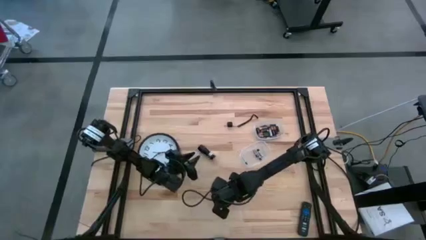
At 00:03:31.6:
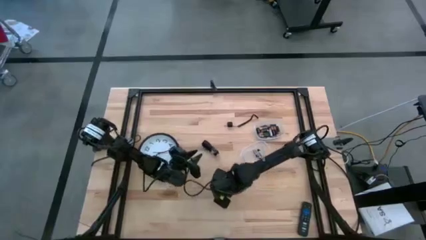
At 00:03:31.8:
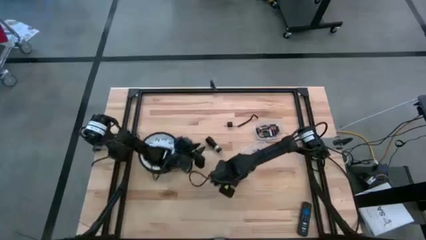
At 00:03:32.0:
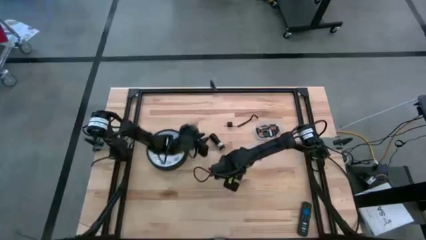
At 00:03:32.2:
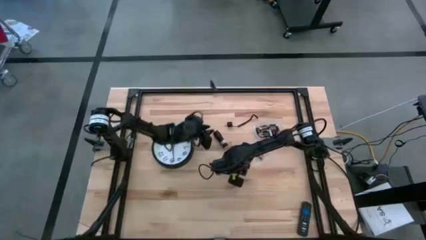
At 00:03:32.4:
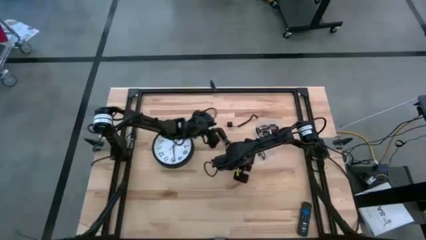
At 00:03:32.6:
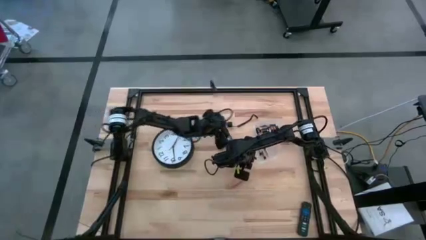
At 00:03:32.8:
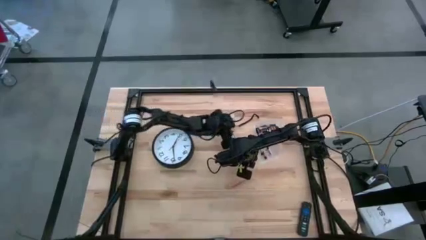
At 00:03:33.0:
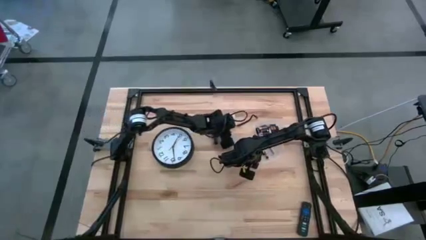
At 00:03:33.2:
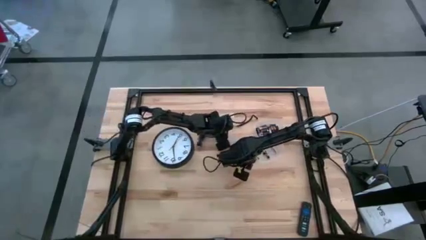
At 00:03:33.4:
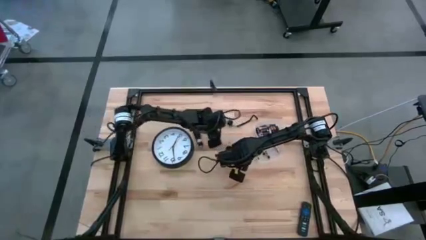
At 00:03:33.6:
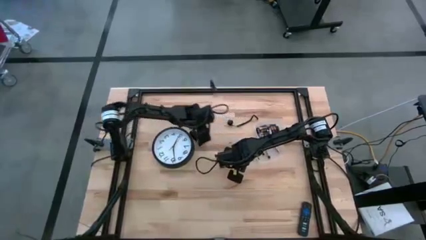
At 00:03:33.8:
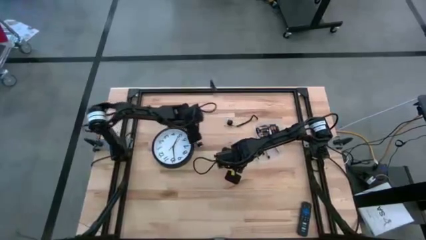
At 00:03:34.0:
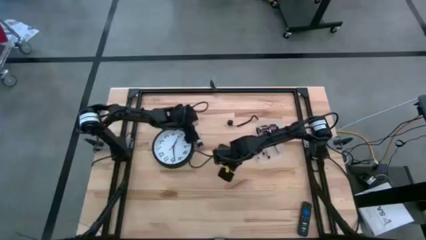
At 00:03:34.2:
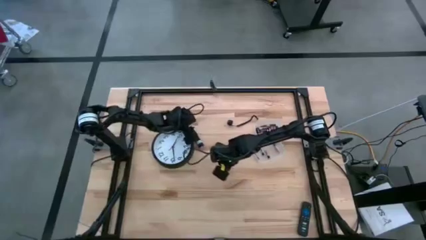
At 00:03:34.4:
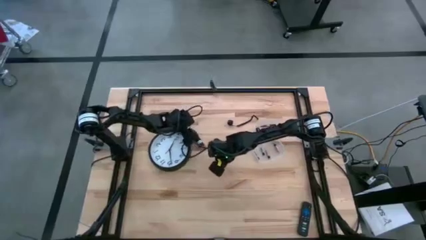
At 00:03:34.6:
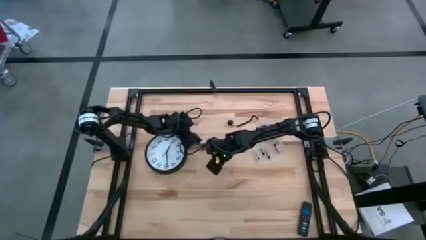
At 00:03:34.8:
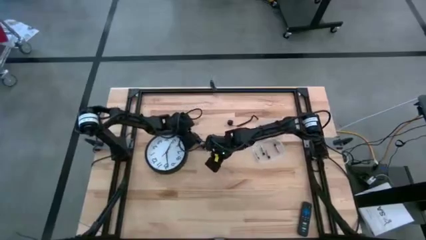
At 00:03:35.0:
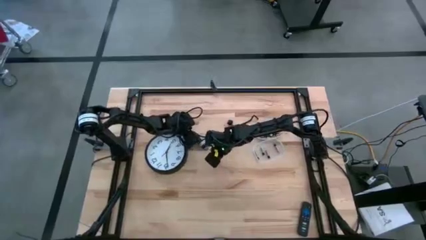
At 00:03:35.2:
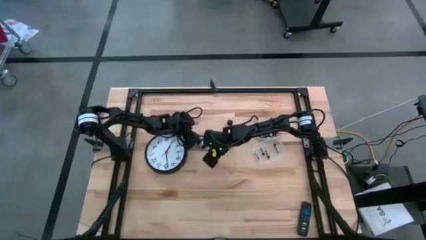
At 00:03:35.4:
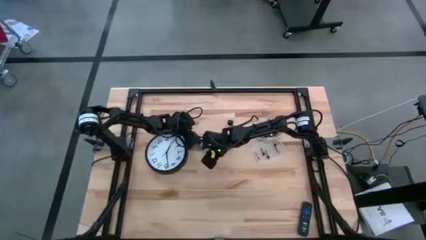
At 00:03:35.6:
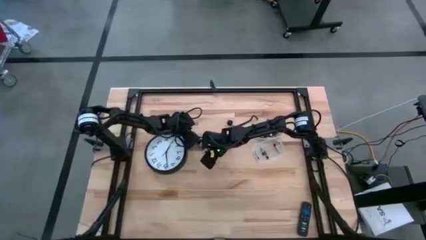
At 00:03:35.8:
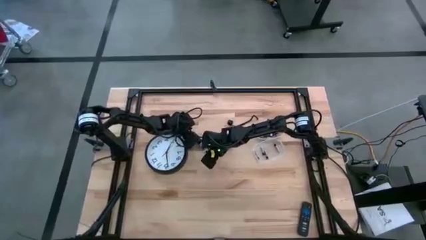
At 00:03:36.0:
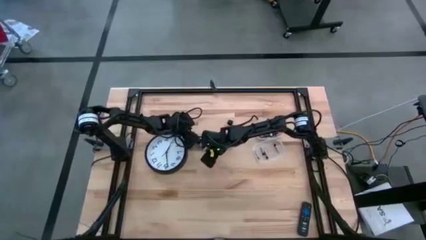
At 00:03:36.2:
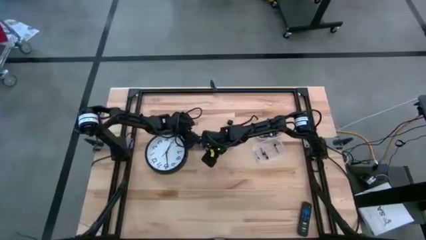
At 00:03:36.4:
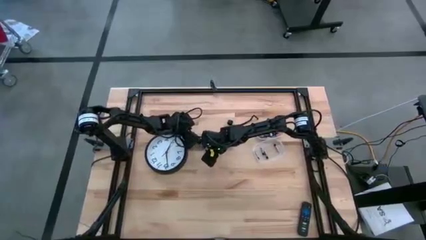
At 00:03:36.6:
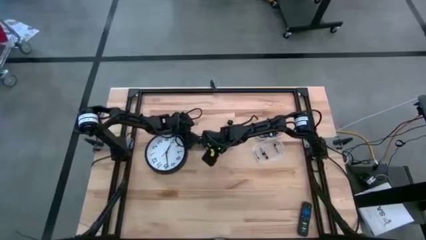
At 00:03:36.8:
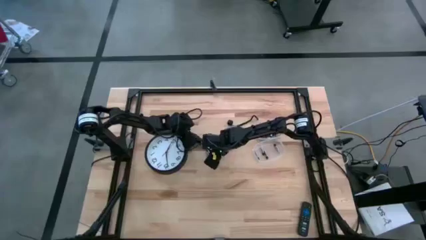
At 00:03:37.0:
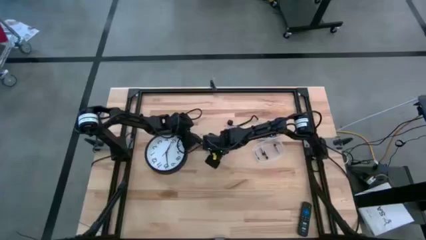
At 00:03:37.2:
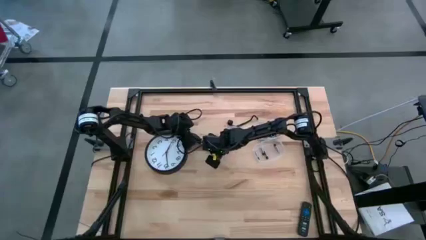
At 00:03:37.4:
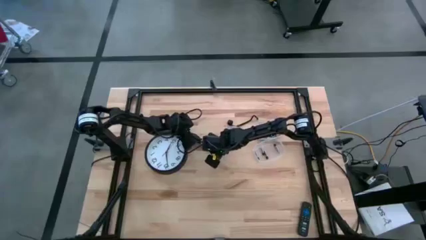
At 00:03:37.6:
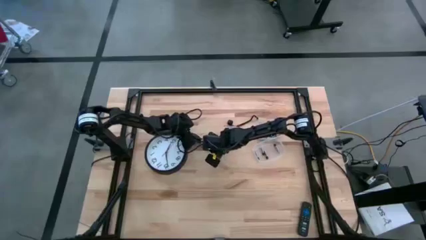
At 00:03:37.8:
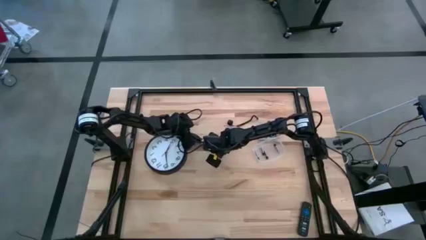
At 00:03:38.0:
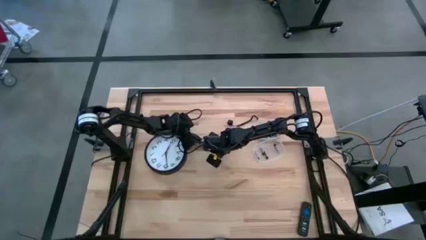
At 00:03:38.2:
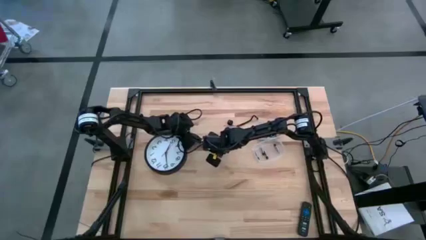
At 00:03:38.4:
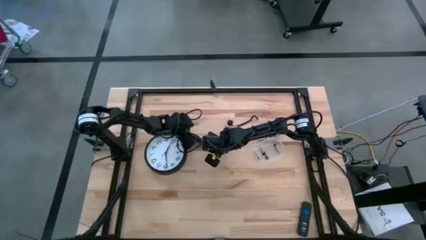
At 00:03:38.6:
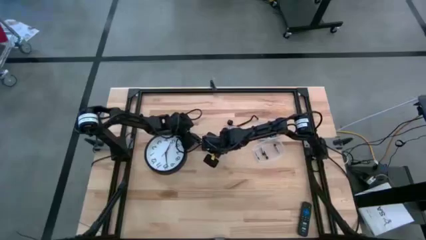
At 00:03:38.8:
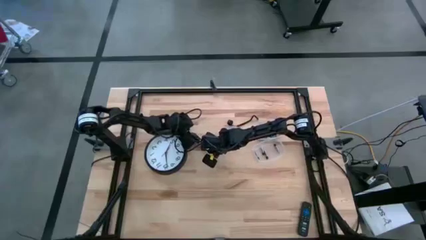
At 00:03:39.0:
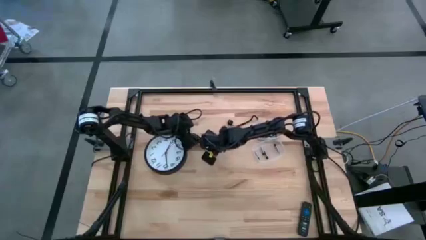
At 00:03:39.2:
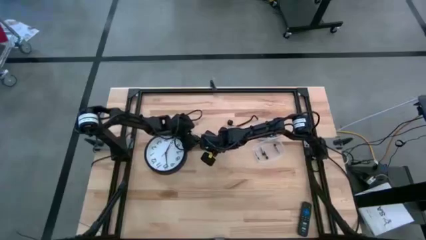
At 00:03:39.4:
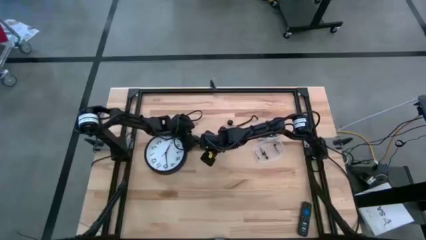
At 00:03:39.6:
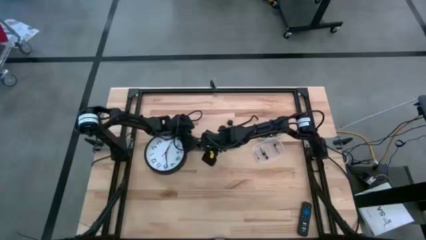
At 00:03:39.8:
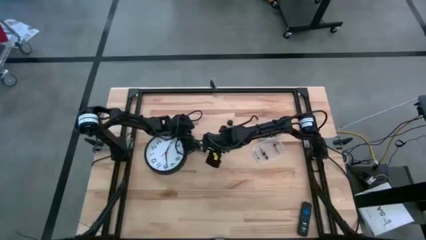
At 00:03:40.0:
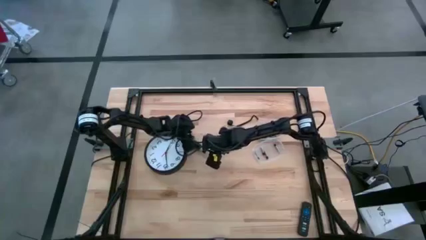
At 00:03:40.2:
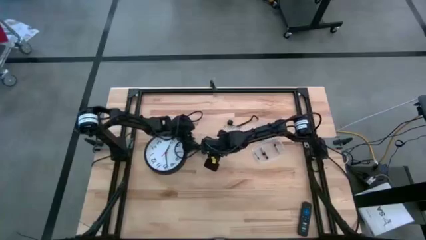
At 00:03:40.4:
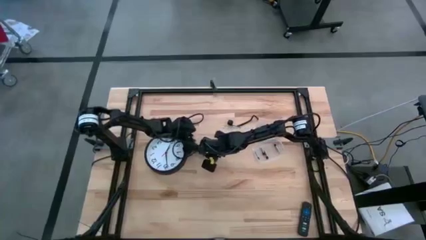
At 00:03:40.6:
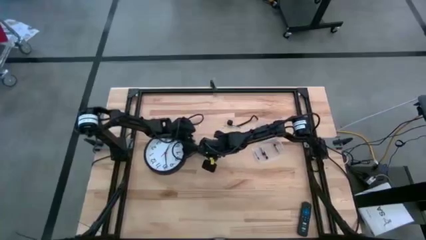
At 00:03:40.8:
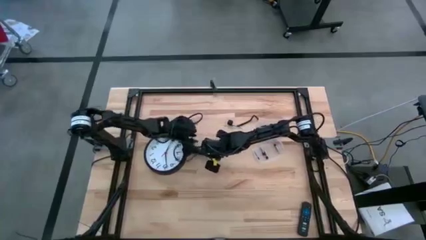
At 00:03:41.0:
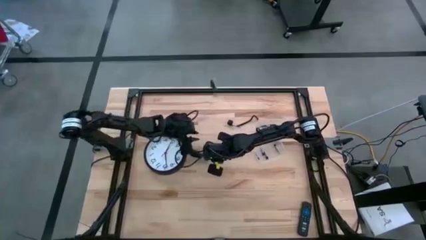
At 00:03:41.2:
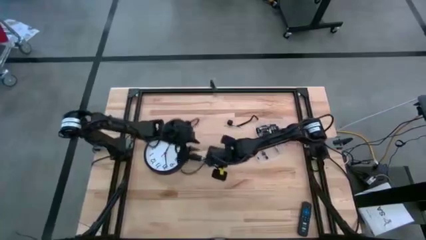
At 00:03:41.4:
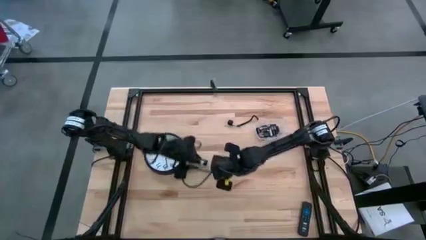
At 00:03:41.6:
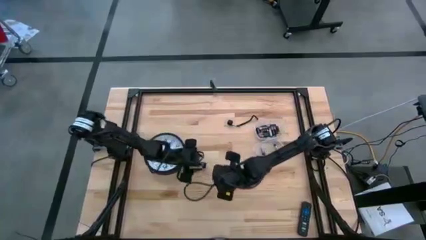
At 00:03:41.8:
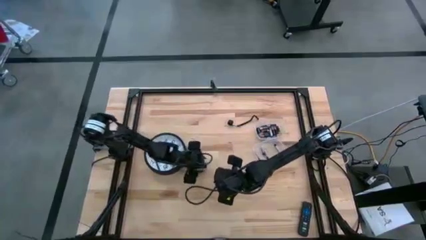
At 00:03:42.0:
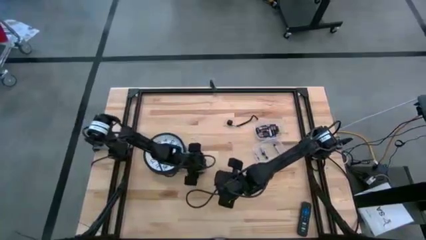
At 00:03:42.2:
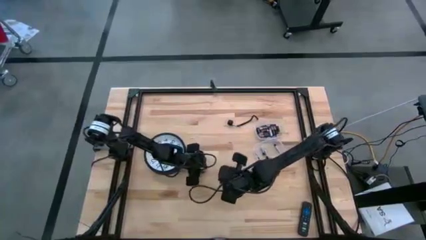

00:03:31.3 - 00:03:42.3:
Task: Insert battery
Insert the battery holder into the white flashlight battery compartment

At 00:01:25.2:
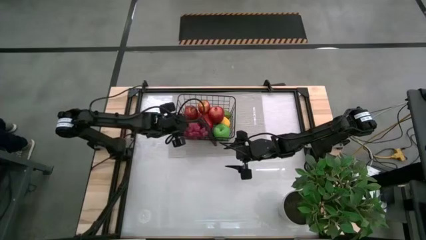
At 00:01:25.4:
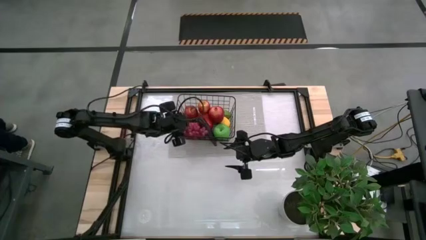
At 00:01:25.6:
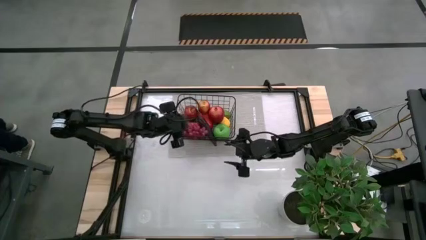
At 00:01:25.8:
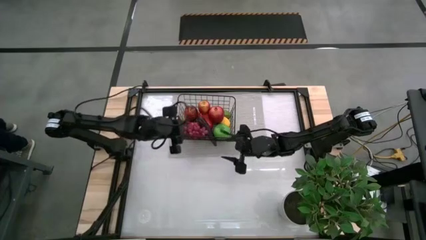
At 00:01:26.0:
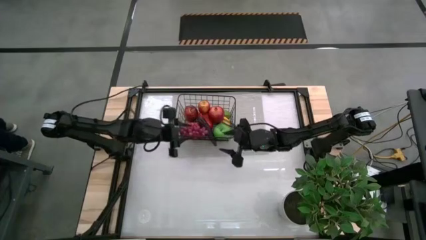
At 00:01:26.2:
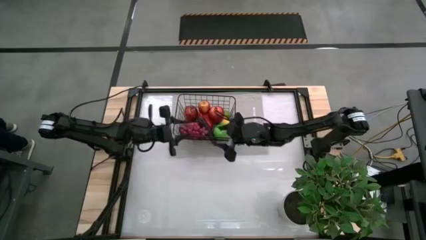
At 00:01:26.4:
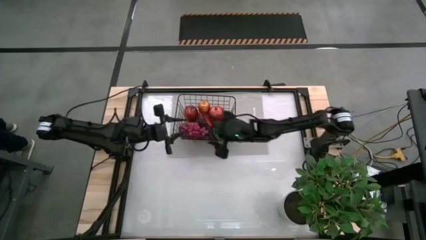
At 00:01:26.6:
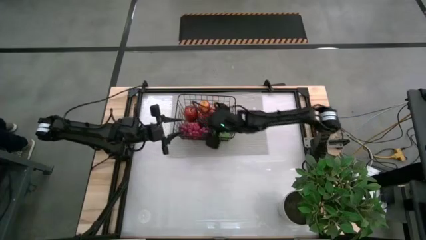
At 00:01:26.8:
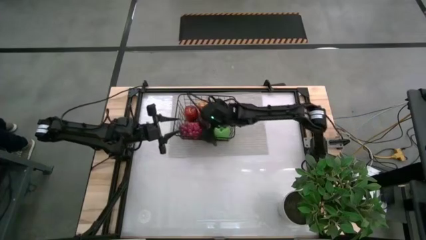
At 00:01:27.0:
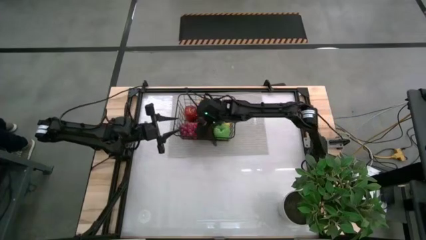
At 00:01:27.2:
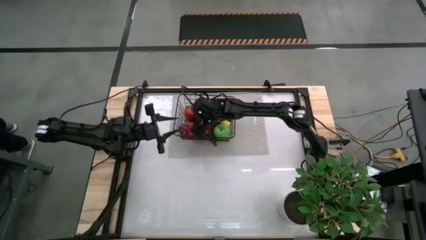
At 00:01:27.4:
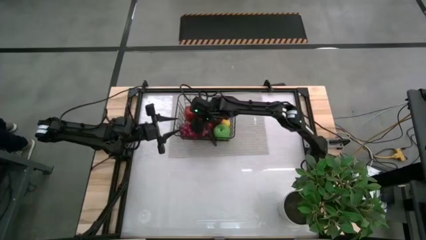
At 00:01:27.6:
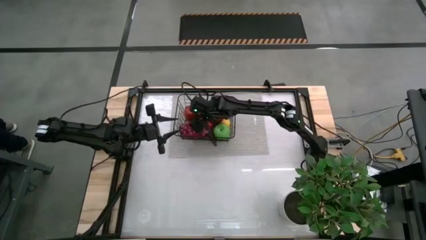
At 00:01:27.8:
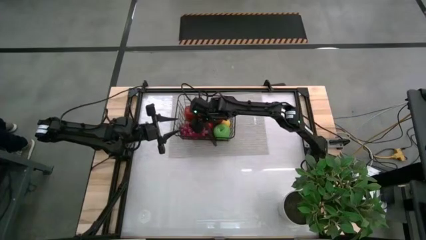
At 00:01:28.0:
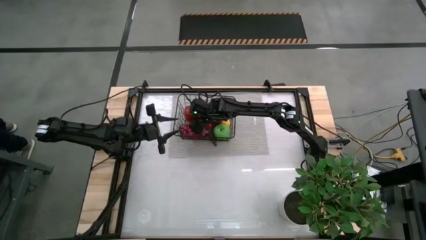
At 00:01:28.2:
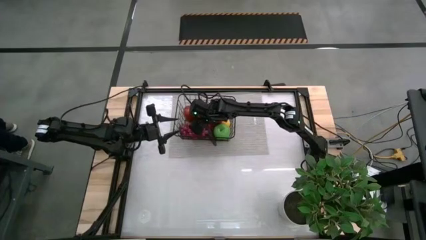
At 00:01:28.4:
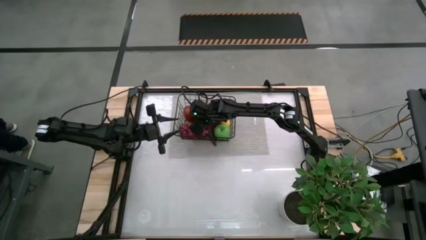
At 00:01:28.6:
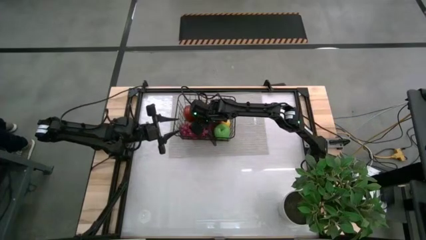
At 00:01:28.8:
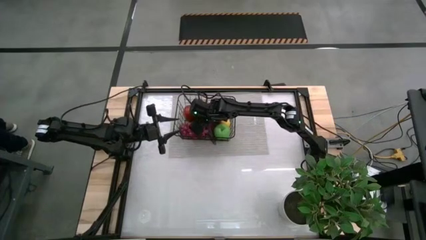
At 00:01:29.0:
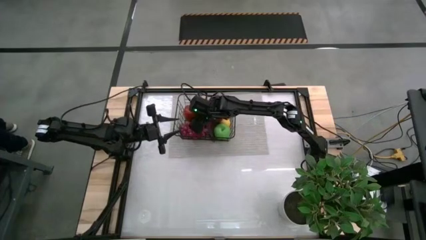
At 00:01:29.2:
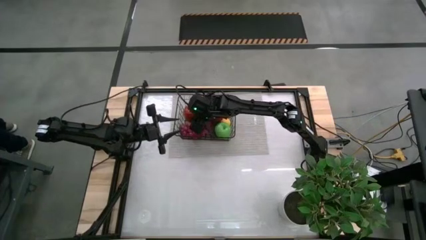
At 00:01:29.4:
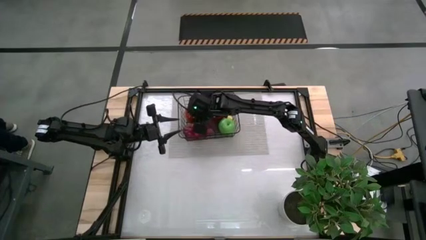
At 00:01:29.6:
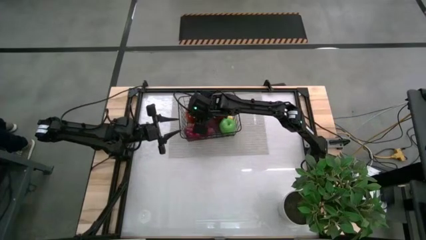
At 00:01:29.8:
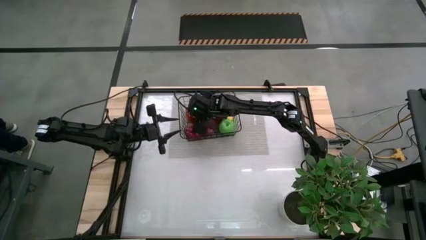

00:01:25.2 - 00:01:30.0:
Task: Build produce basket
Adjust the eggplant to the wire basket

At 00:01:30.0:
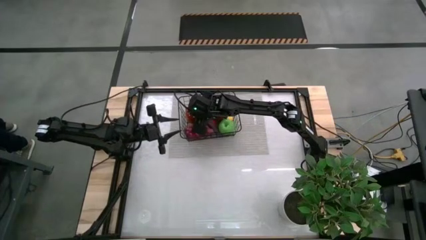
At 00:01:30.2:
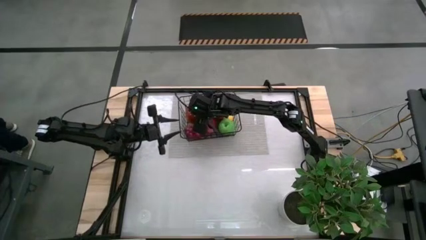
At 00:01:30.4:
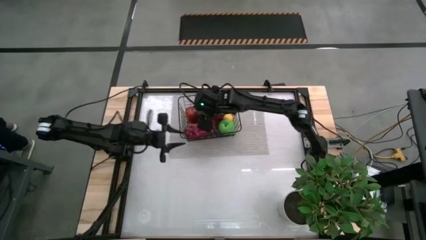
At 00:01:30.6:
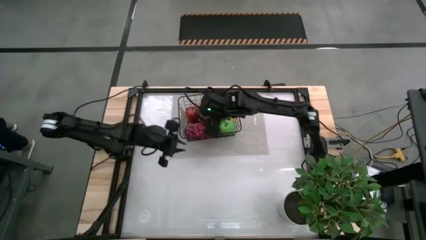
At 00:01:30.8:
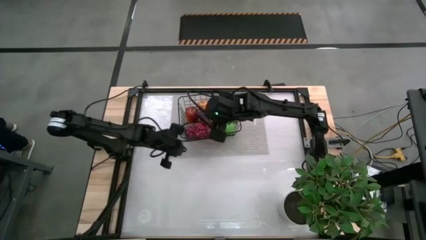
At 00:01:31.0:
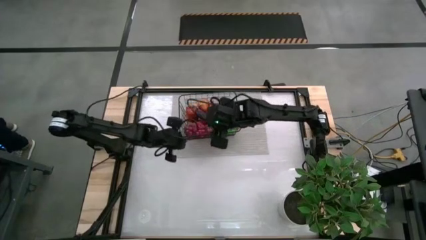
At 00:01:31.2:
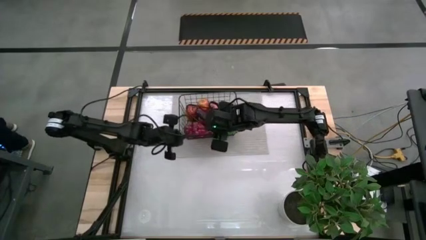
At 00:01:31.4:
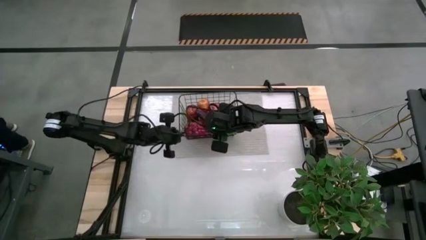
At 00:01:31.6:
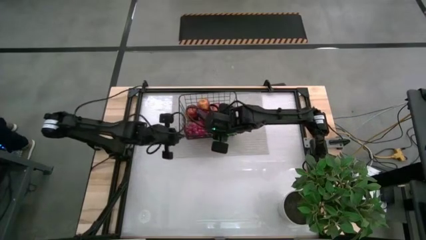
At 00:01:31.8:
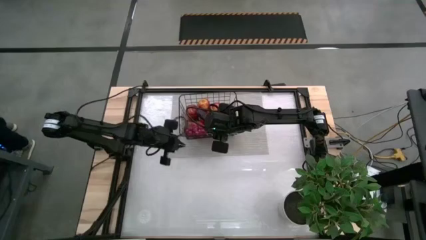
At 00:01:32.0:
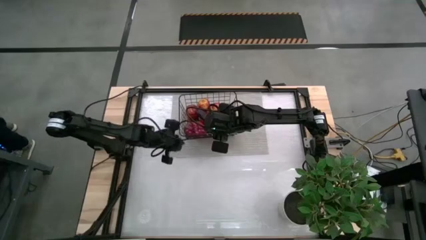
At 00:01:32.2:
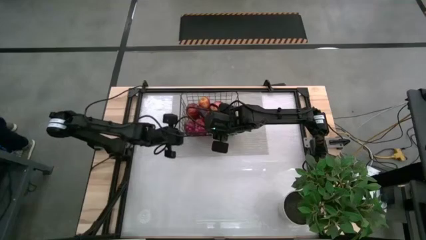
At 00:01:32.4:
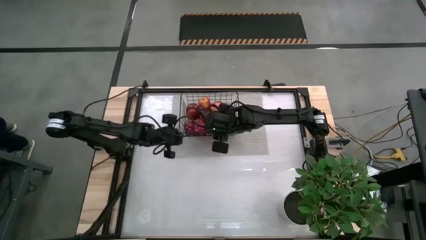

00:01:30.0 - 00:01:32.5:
Adjust the wire basket on the table
